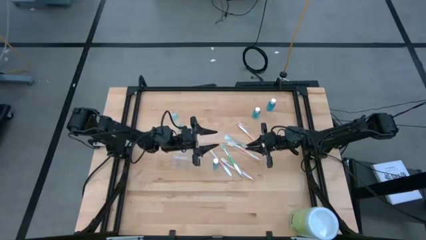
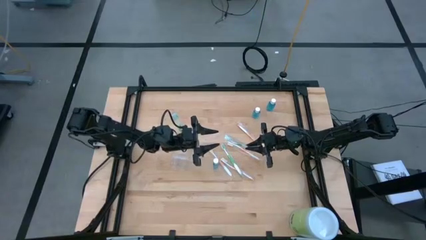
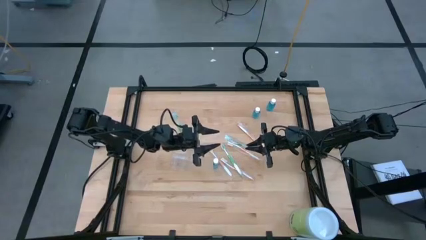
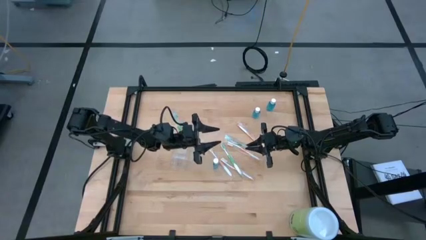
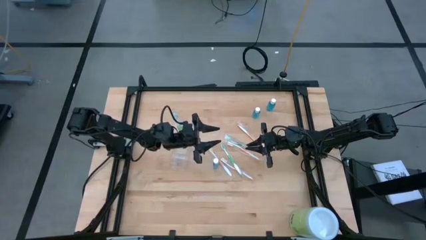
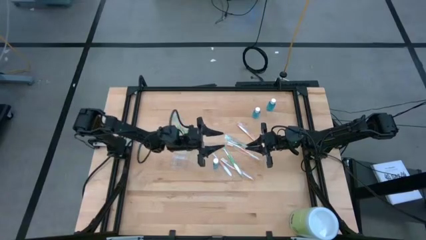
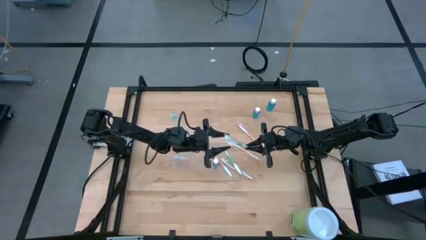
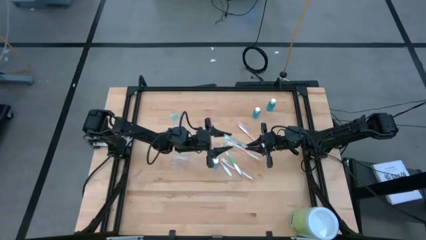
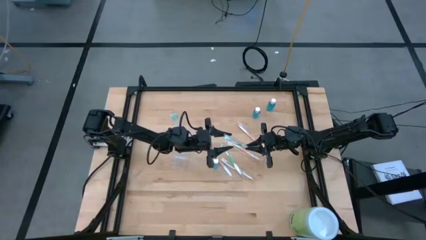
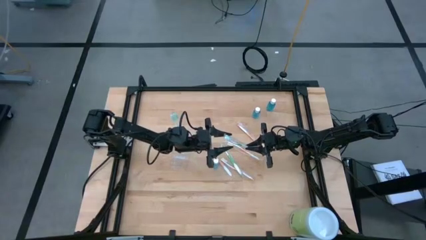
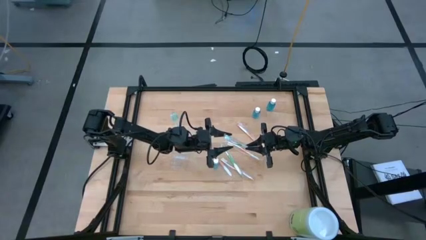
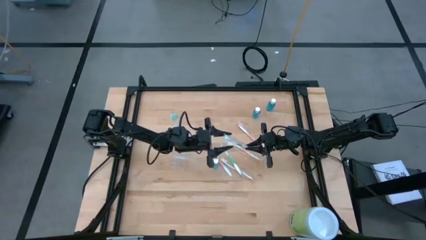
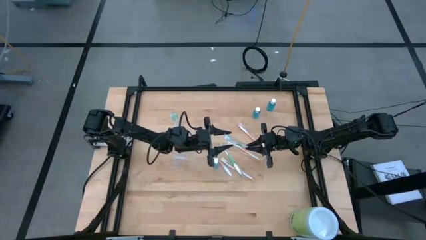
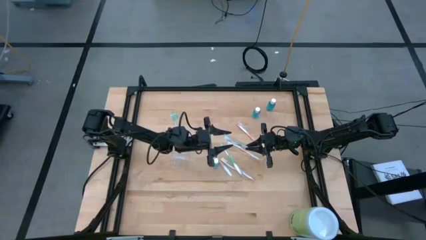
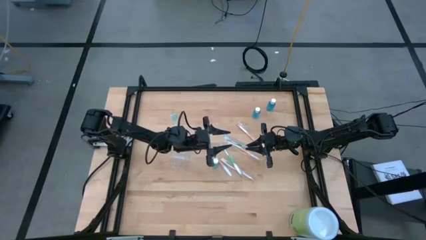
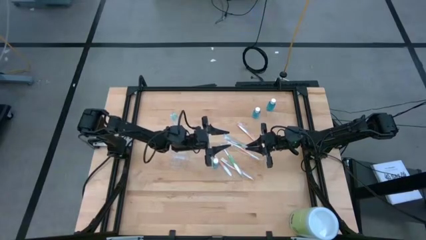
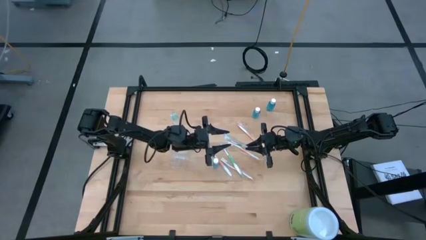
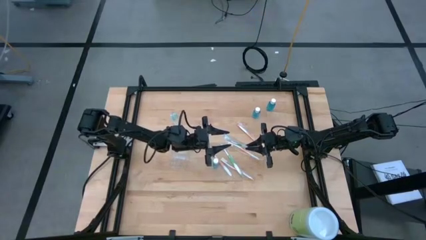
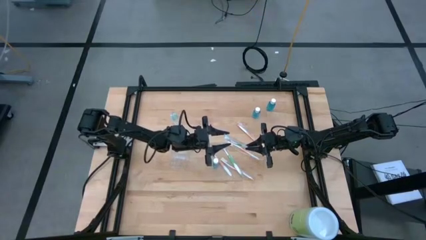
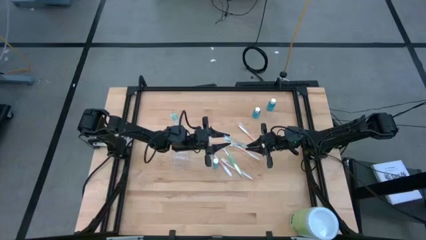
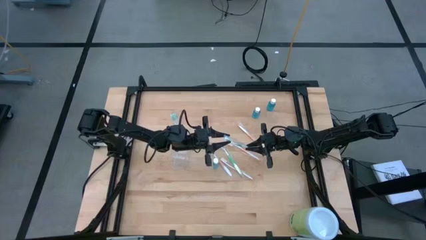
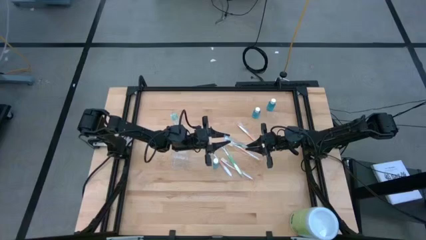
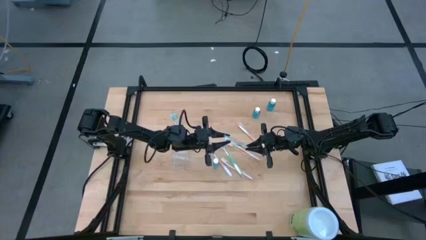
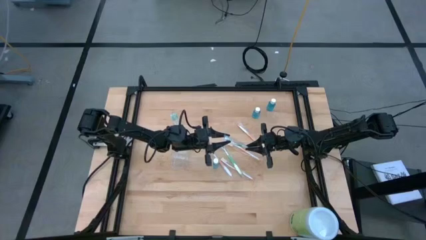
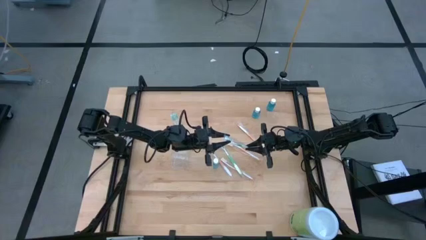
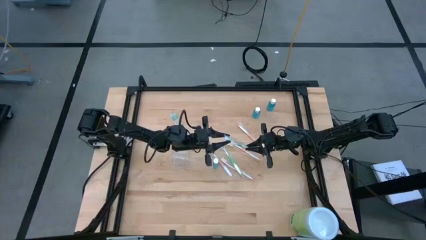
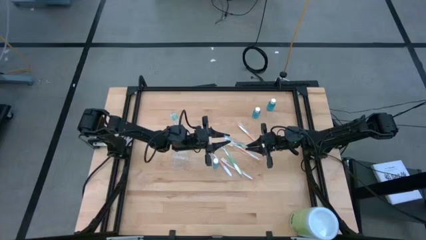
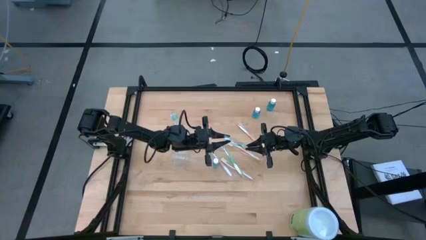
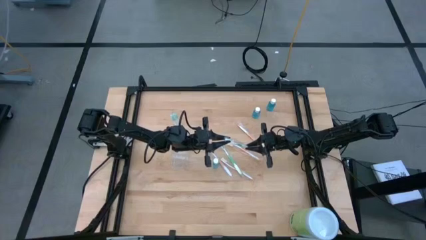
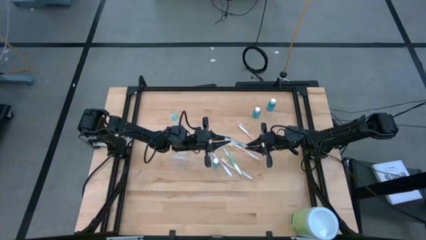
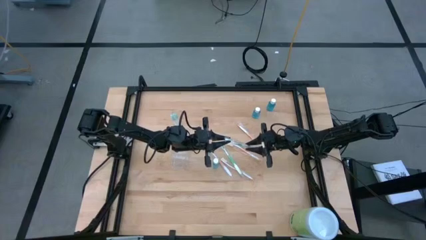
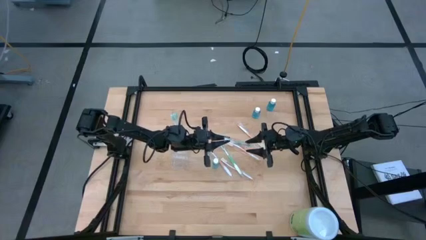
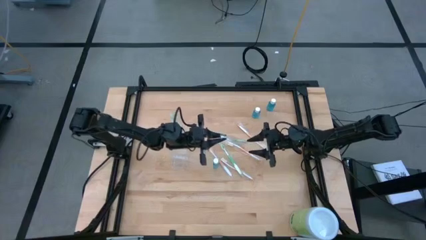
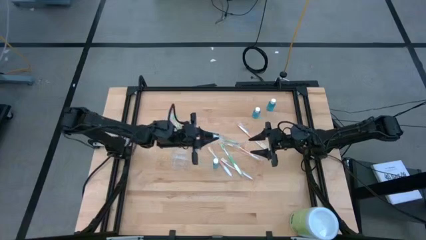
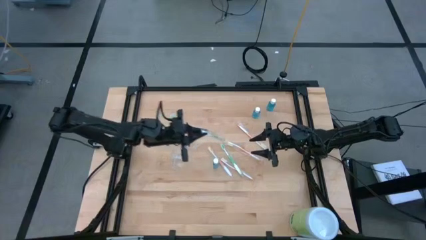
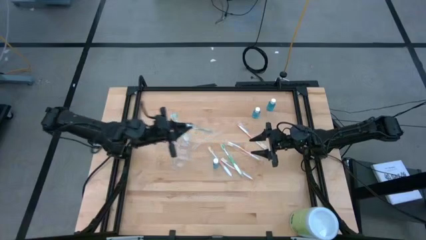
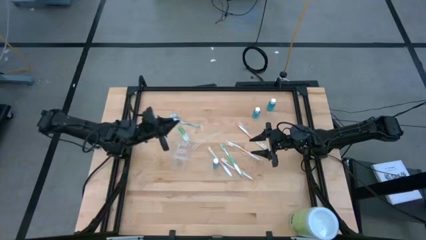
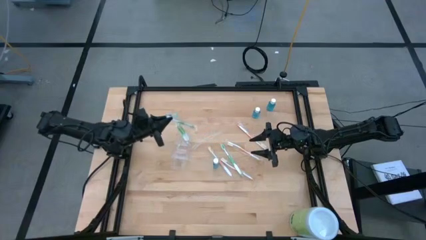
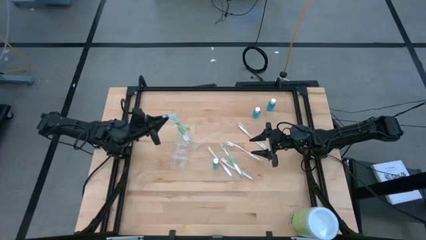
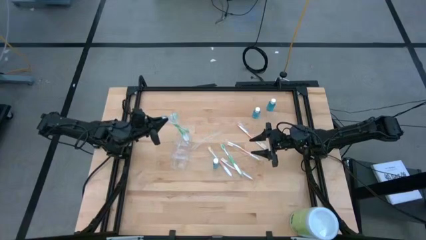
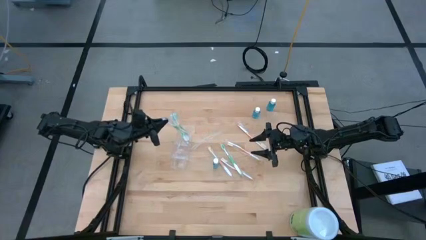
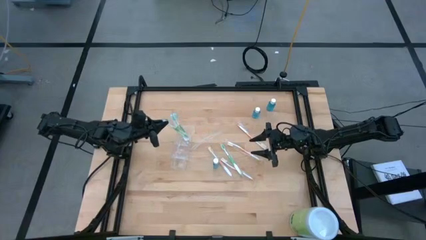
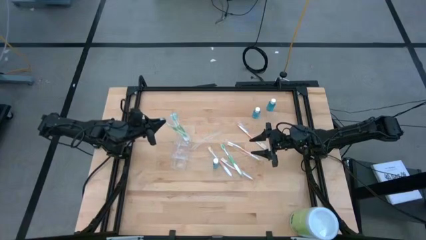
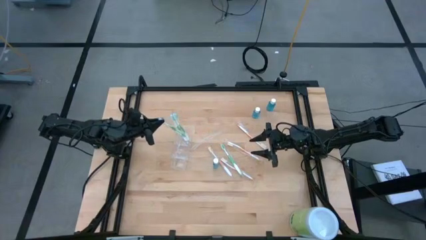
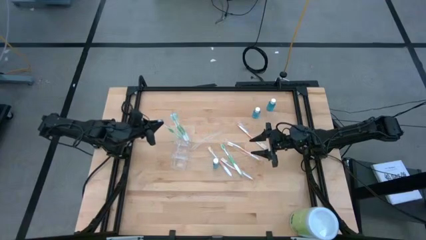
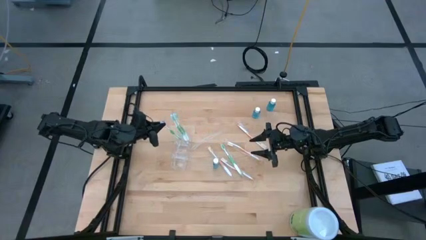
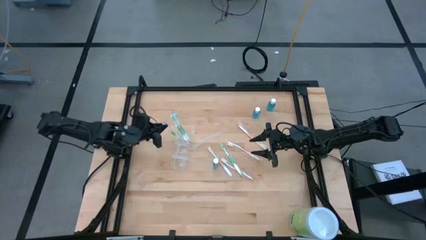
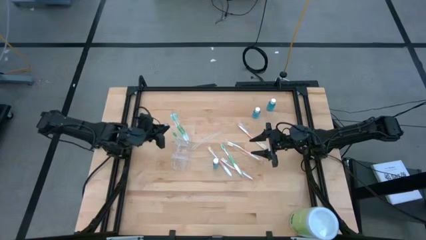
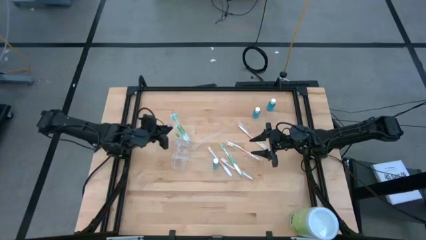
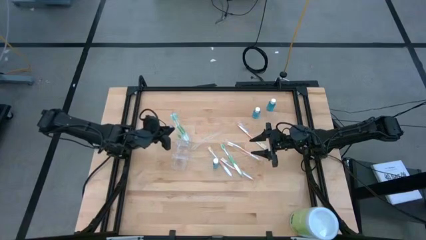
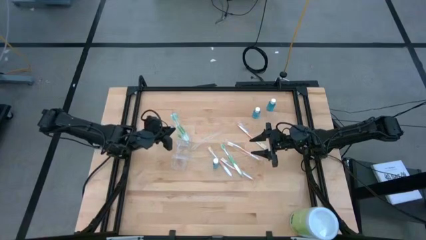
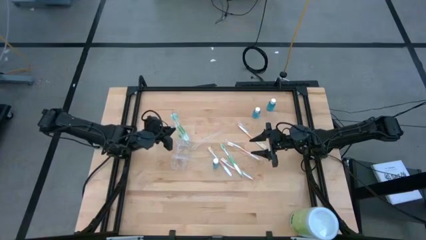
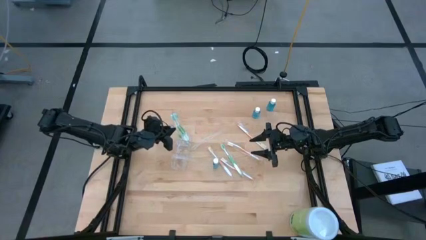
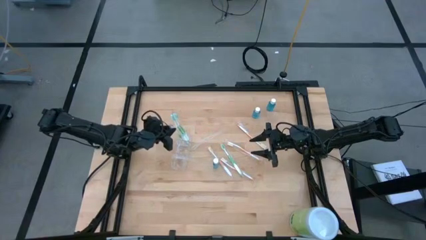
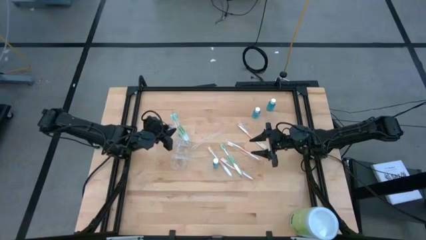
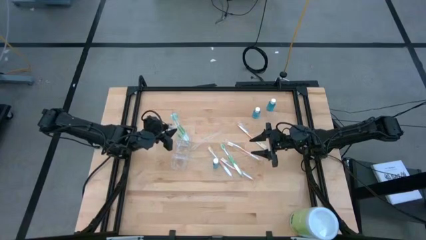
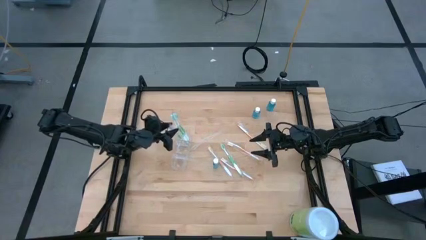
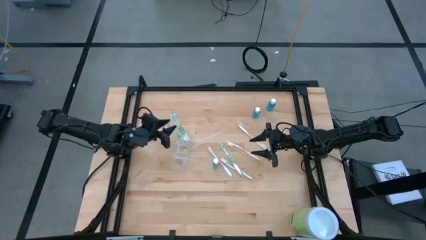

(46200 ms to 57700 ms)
Task: Pick & Place toothbrushing station
Put the green toothbrush into the top section of the transparent organizer

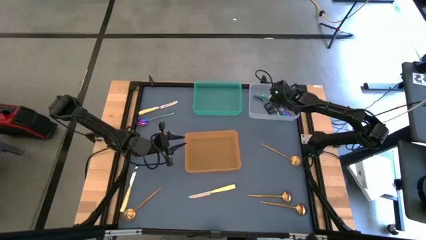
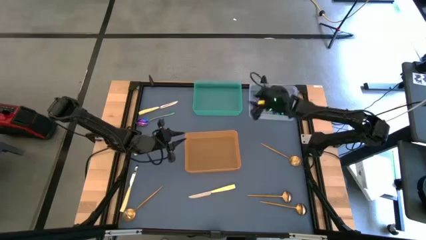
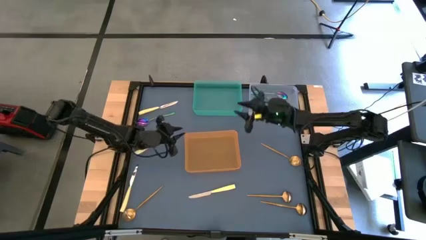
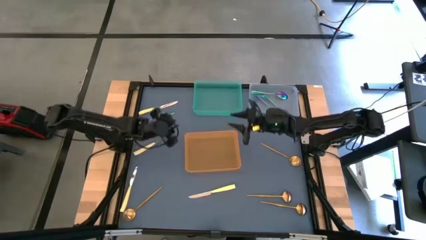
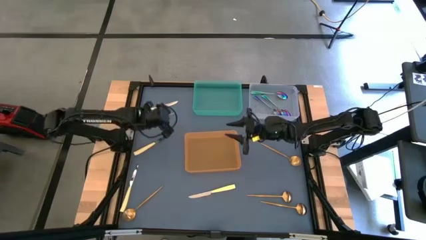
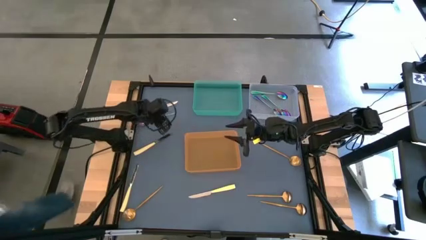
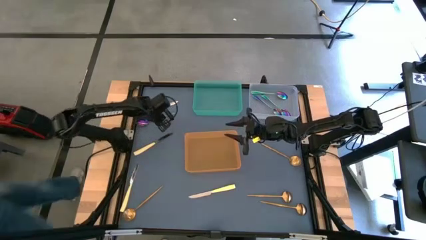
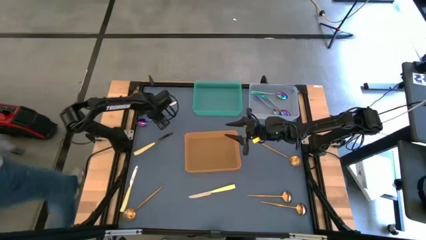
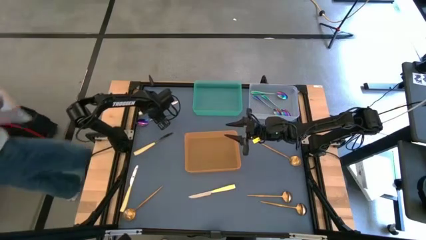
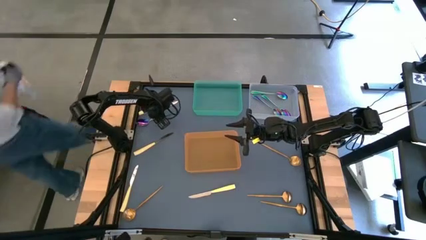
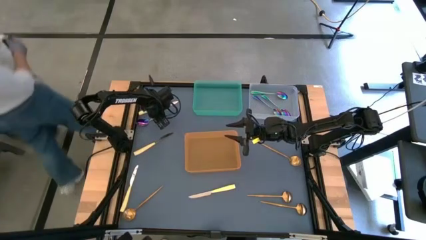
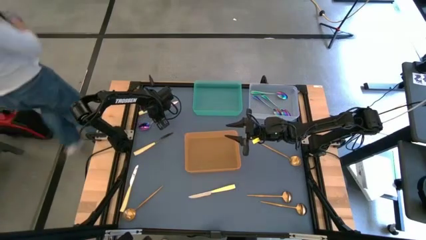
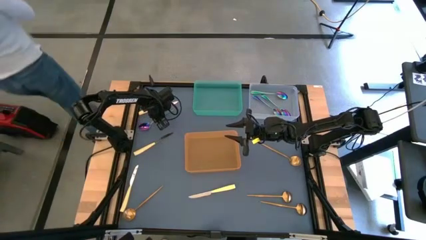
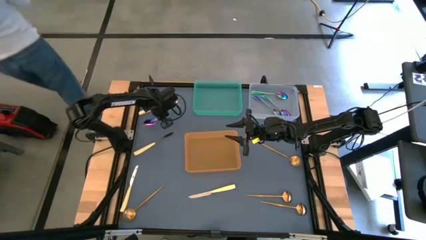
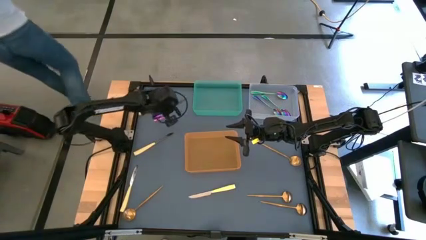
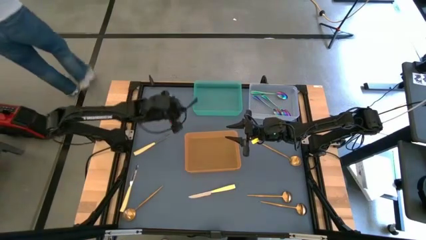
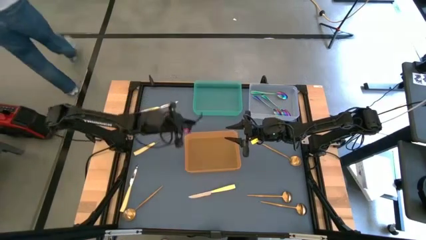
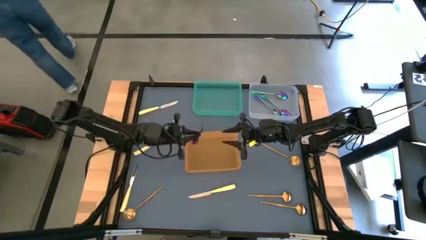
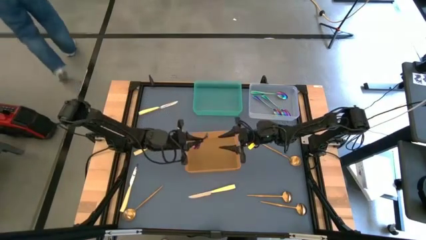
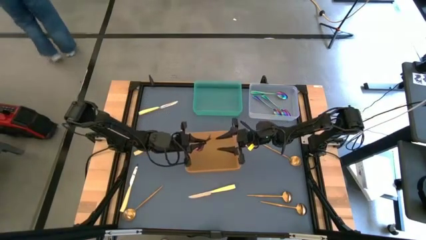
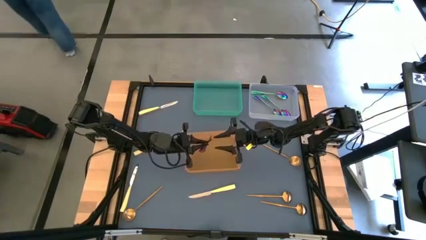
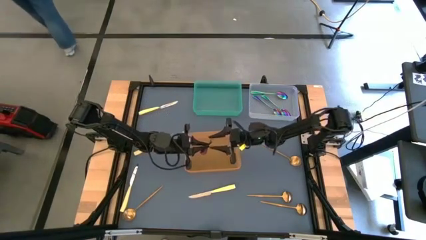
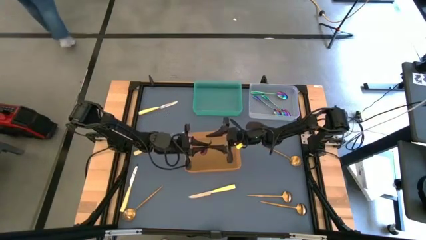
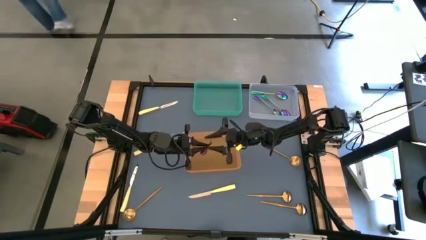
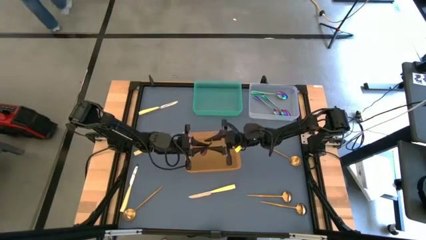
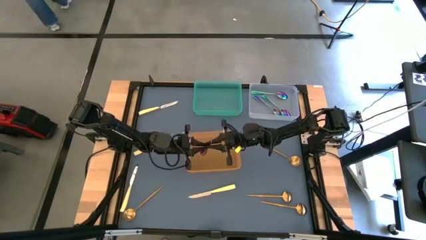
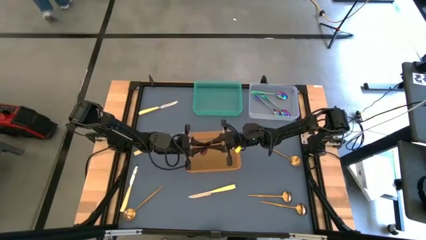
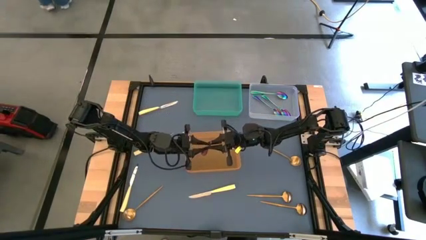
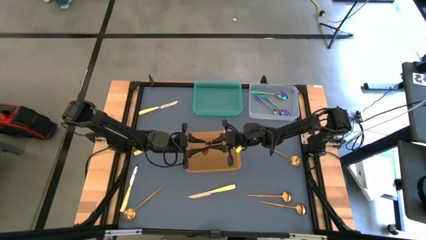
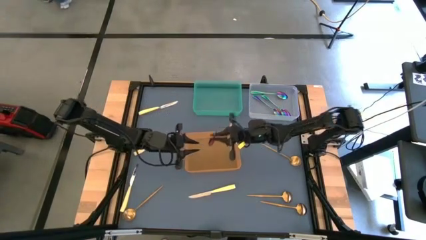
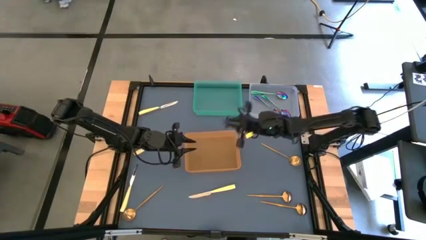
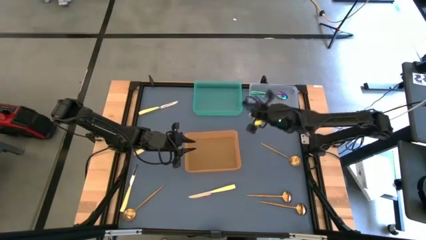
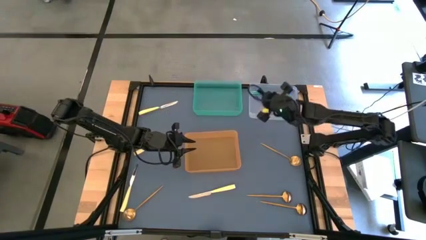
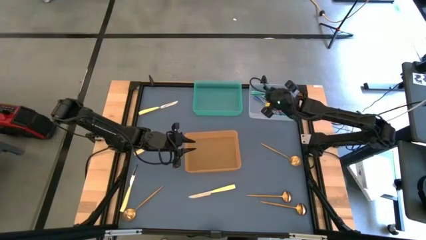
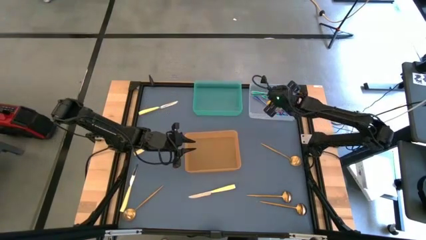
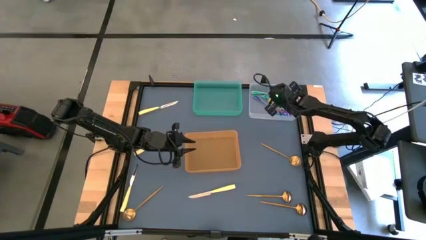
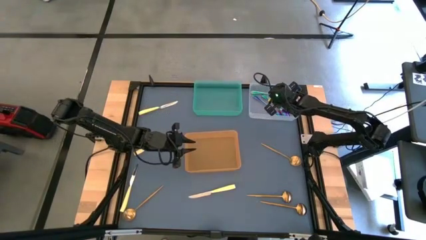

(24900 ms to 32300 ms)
Task: Sort silverware by color (type)
Put the blue spoon into the transparent bin
